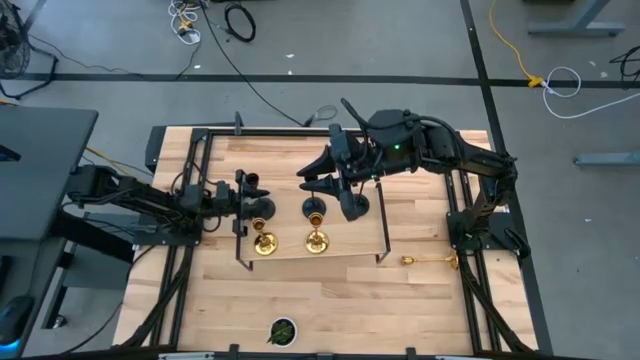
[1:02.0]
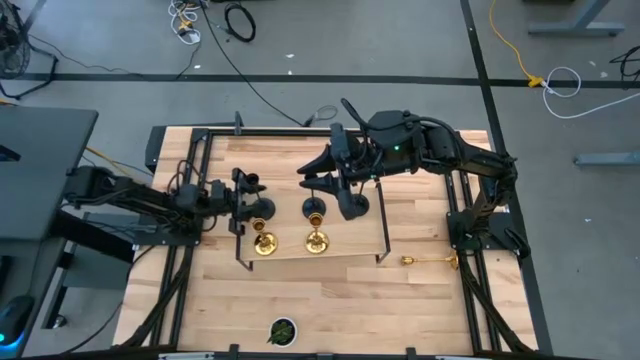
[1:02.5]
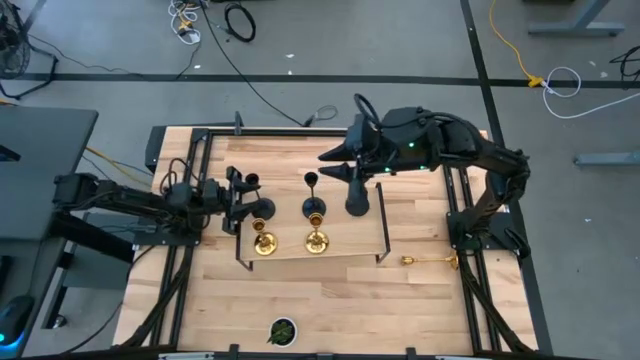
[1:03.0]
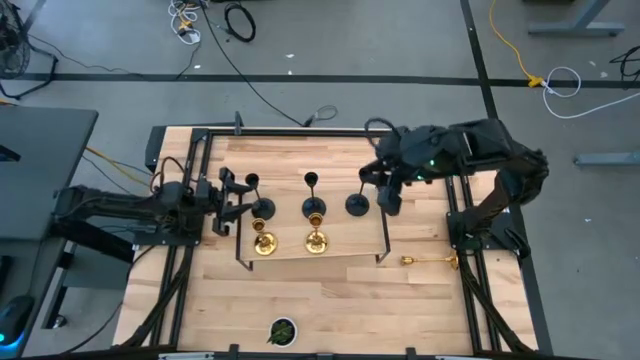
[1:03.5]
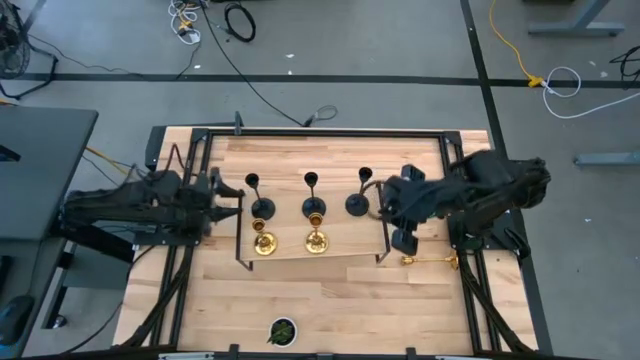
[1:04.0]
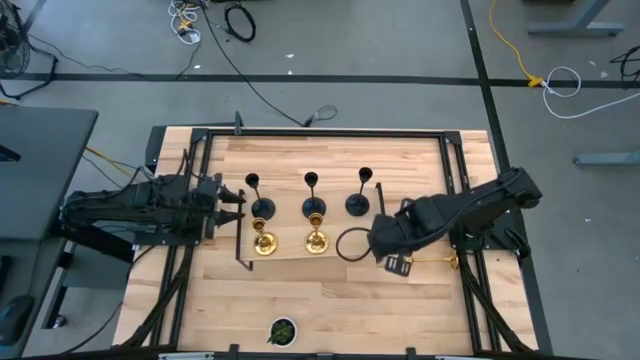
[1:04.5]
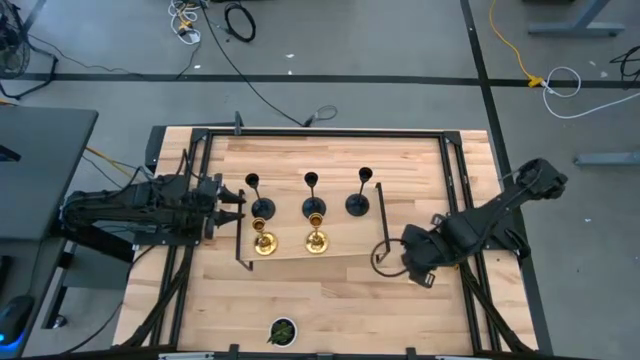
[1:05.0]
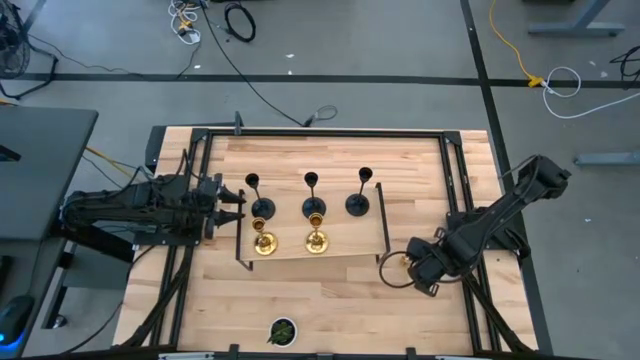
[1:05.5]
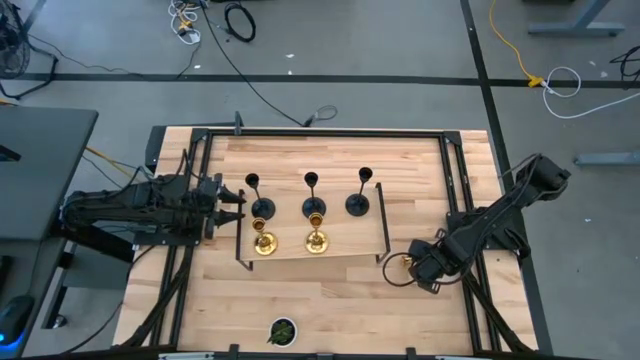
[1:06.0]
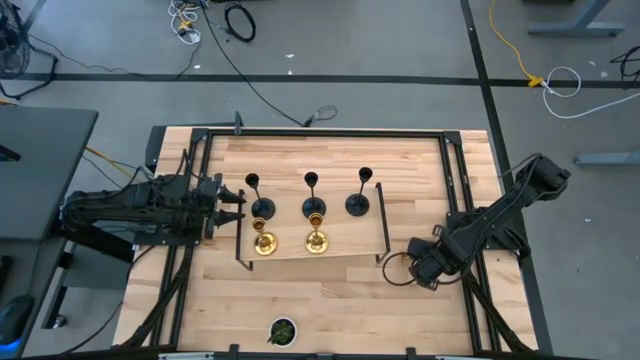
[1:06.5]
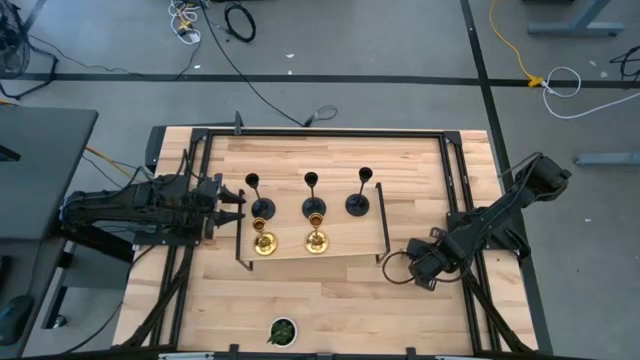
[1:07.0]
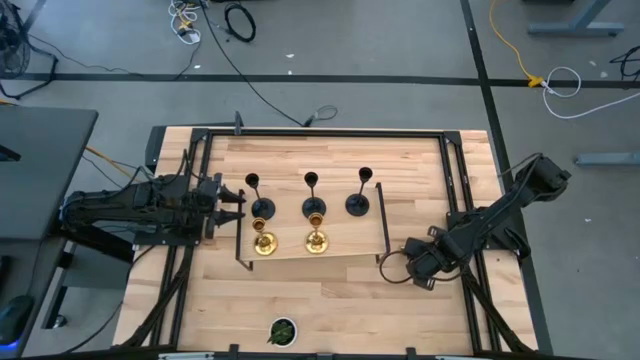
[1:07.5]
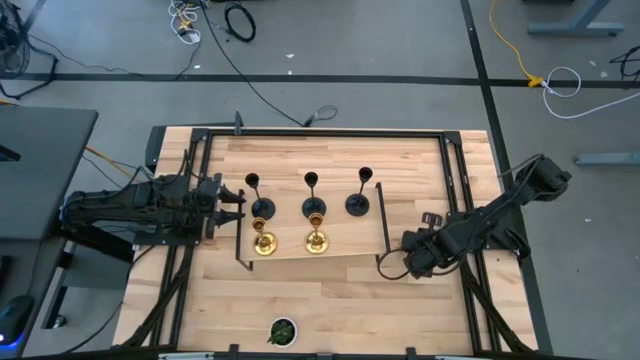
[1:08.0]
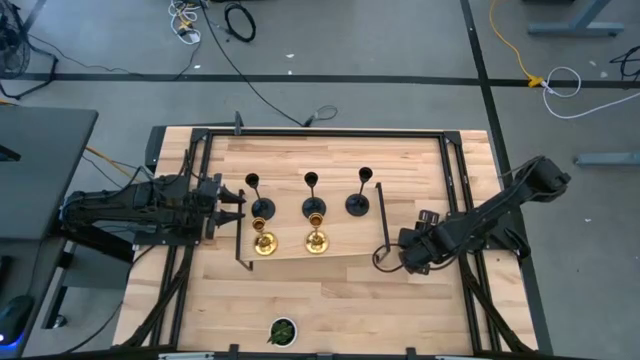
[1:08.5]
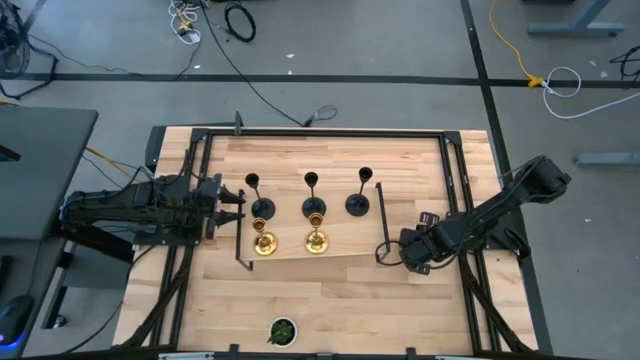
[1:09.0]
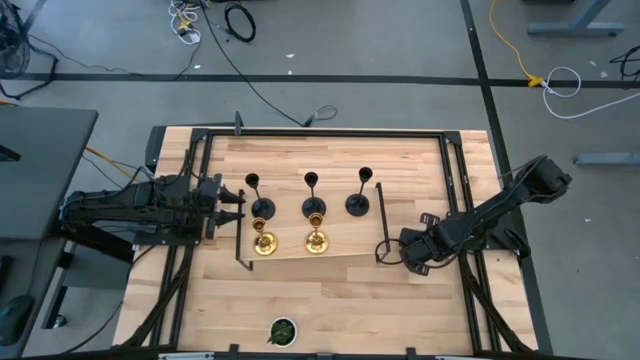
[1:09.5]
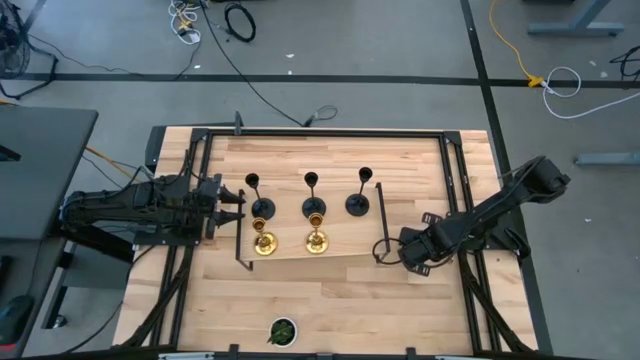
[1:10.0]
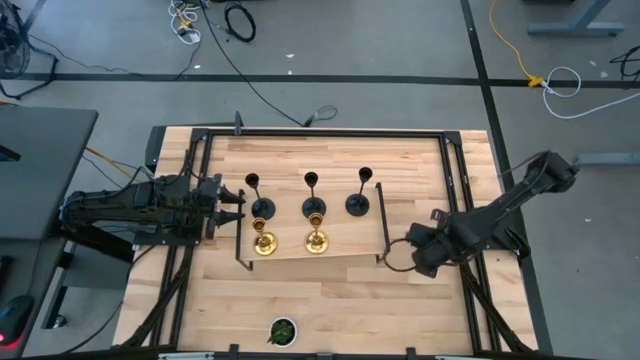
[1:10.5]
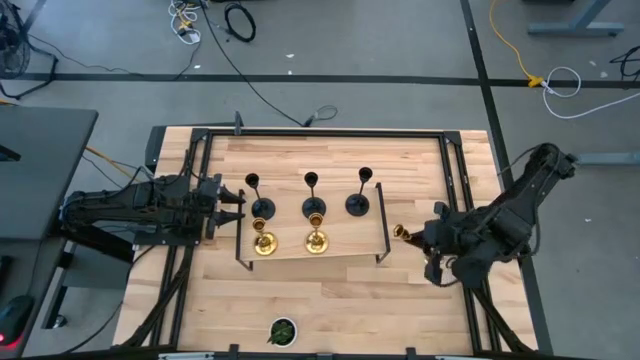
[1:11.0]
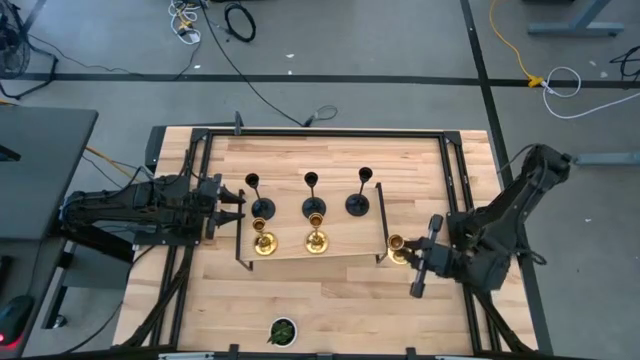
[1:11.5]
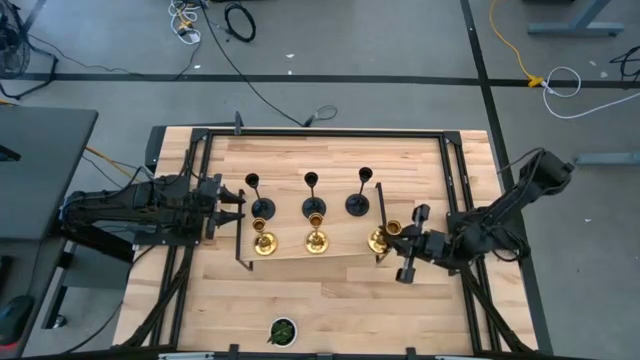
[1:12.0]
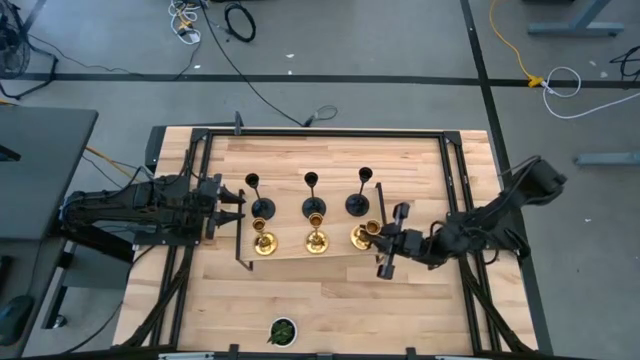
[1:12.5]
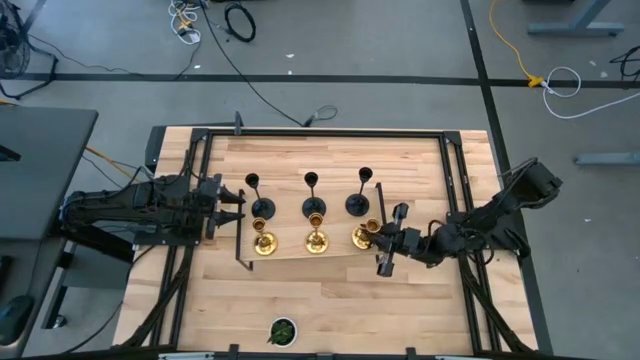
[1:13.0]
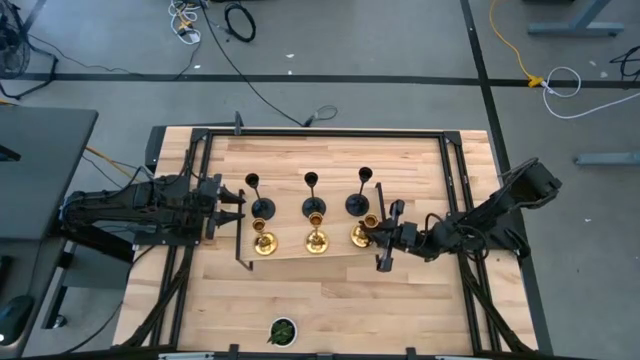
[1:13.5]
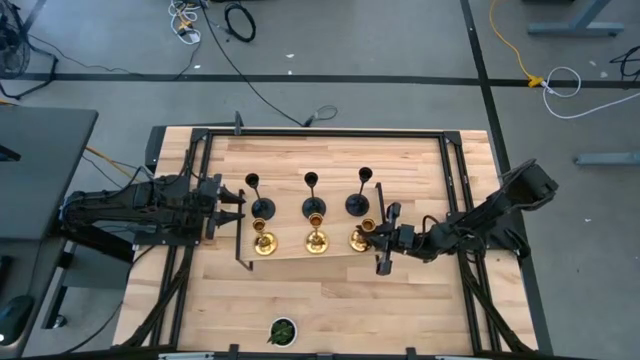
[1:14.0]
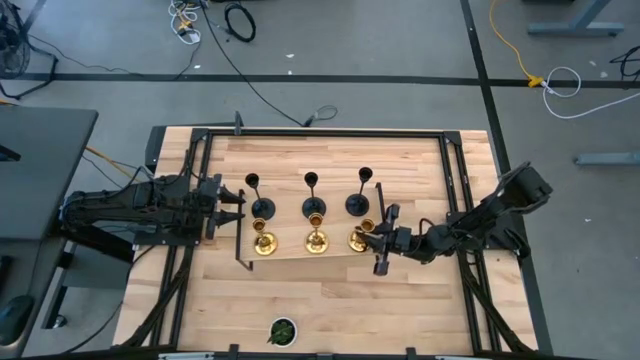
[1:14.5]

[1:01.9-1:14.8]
Task: Pick & Place candle stick holders
Put the gold candle holder aligned with the other gold candle holders on the shelf

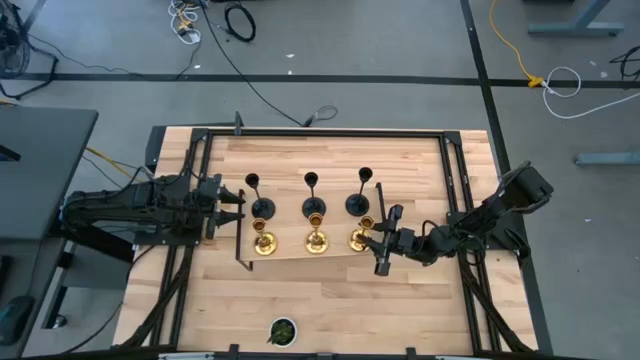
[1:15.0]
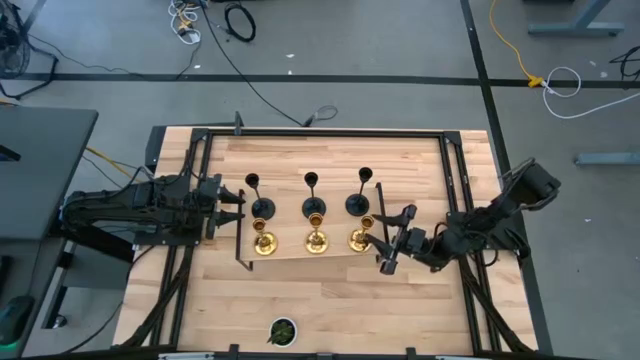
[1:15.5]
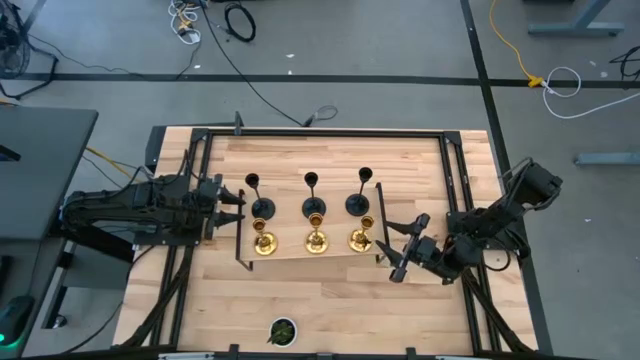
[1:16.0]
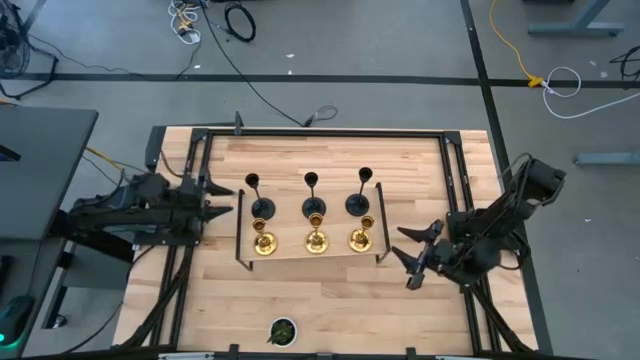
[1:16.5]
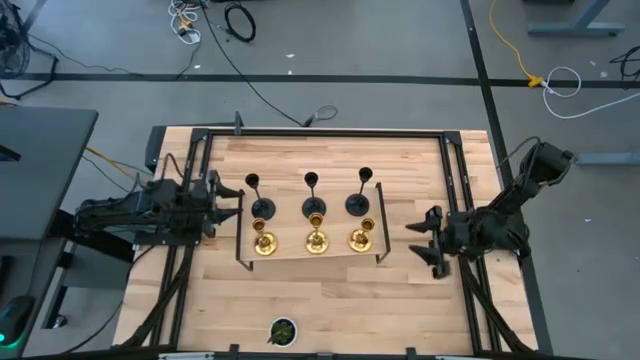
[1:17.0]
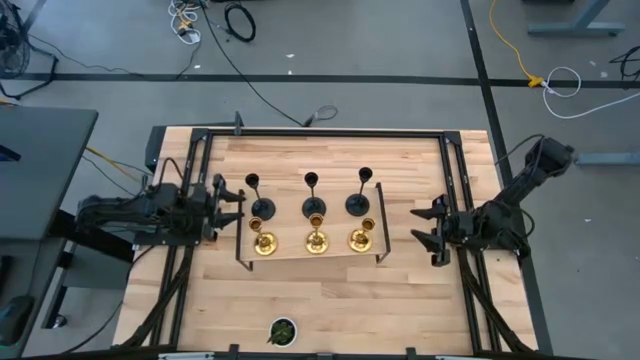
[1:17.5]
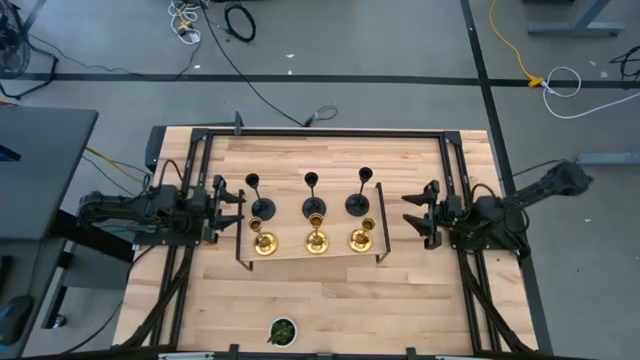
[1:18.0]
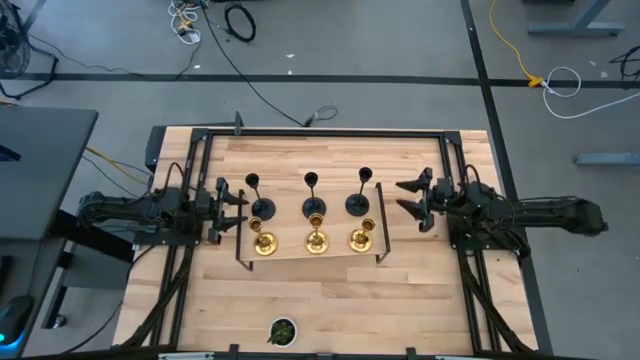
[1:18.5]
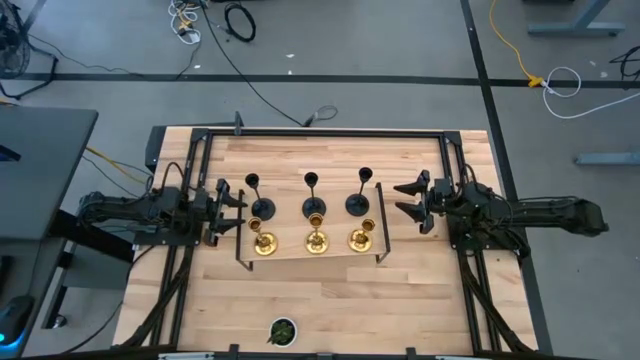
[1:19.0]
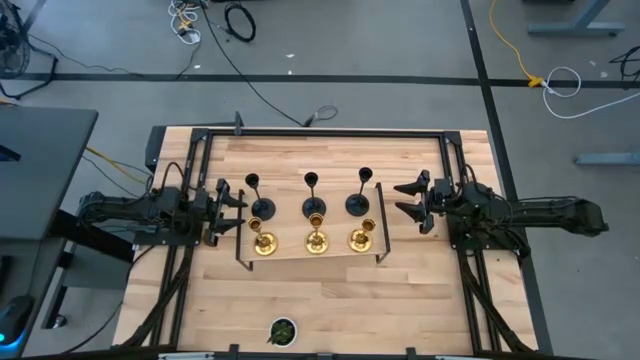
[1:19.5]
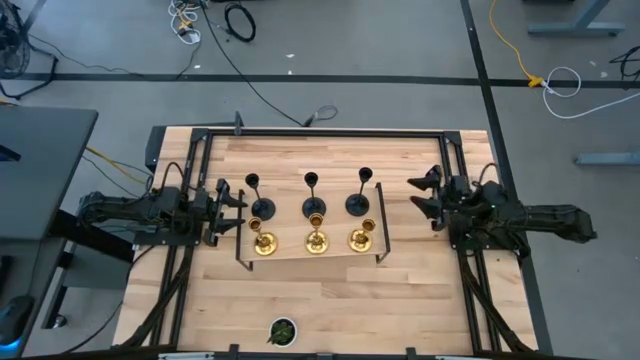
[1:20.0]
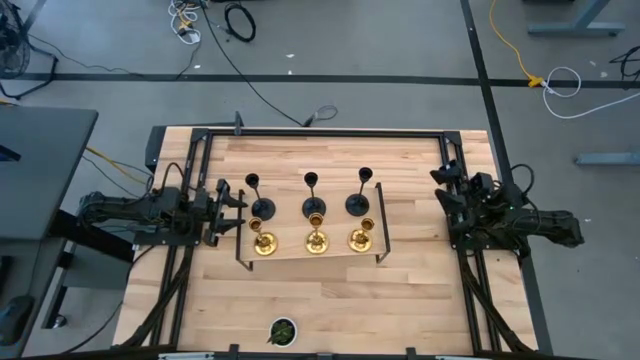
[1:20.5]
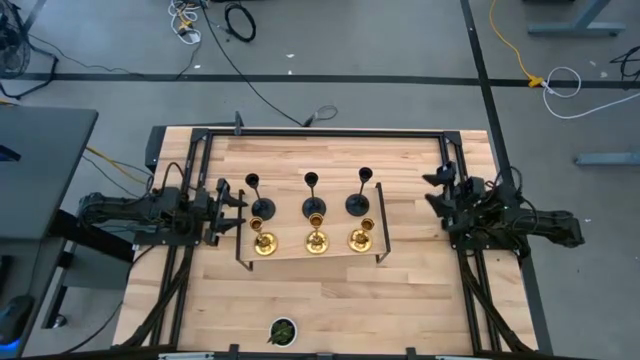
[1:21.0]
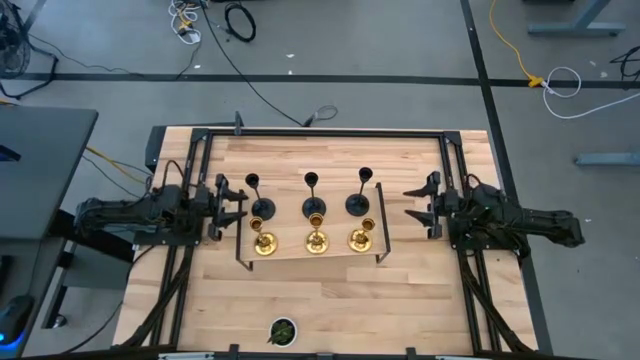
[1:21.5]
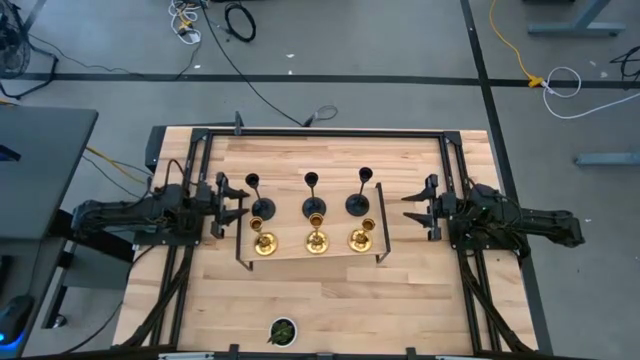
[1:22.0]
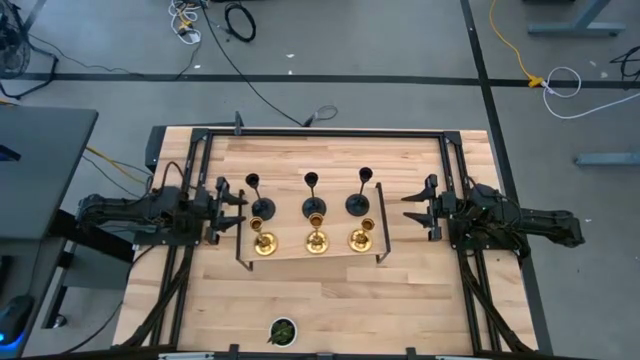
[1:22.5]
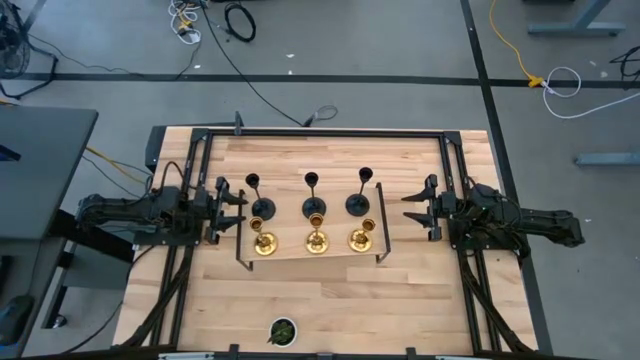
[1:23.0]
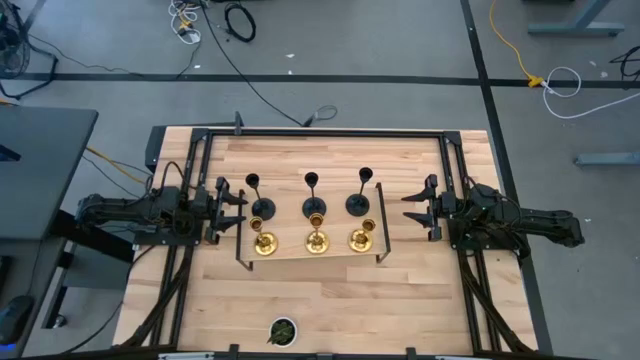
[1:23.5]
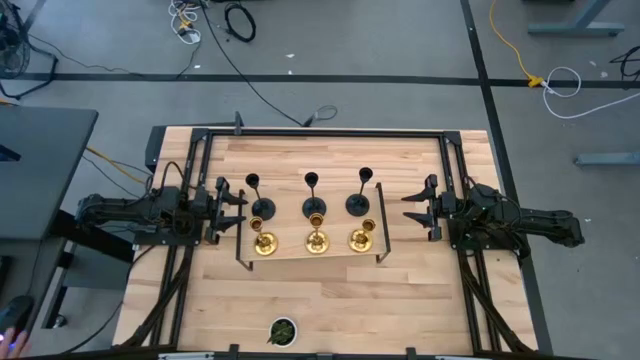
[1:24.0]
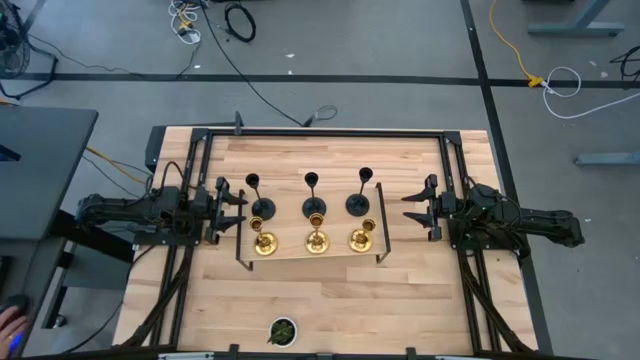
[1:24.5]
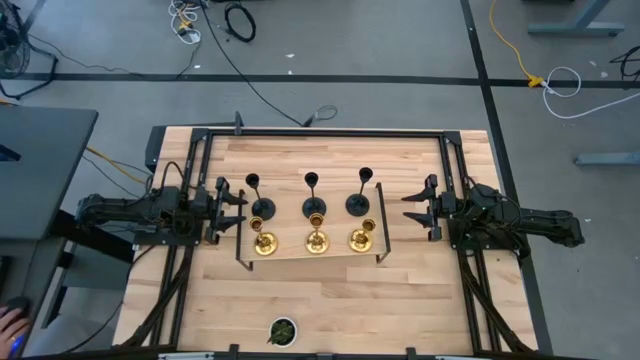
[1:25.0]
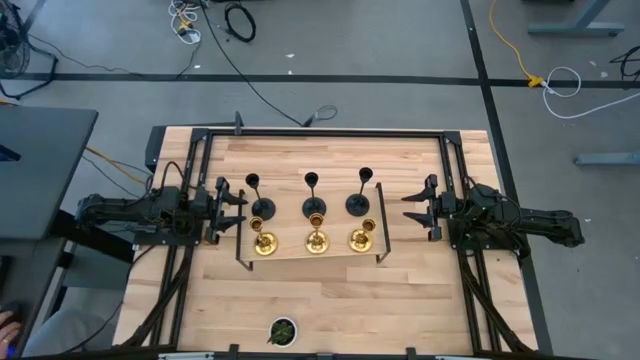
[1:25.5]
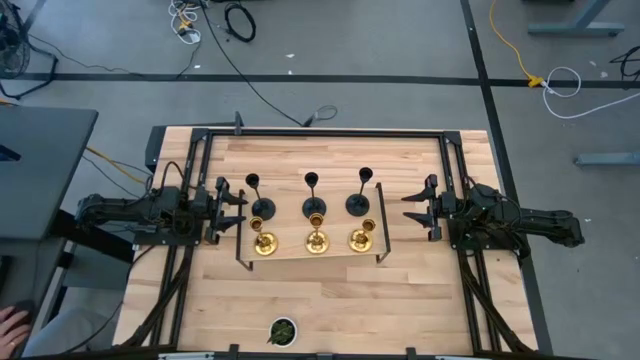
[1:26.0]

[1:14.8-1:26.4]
Return to Home Position
